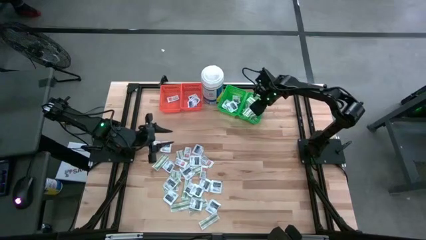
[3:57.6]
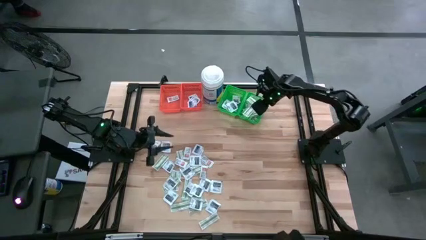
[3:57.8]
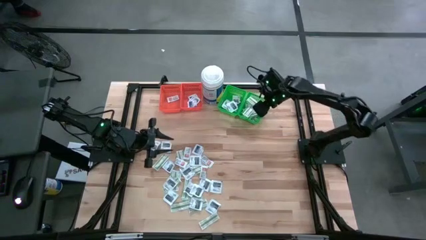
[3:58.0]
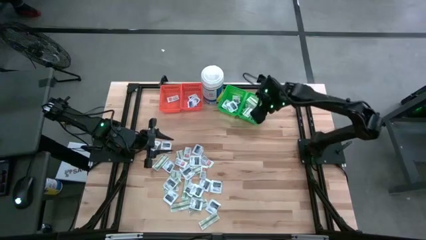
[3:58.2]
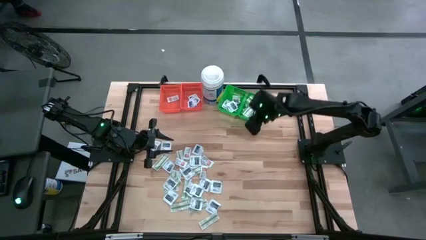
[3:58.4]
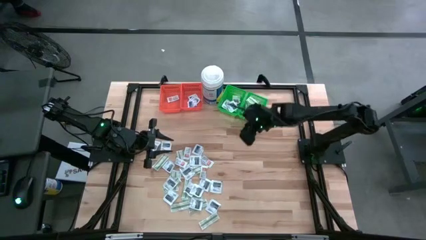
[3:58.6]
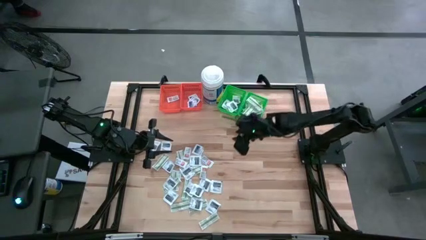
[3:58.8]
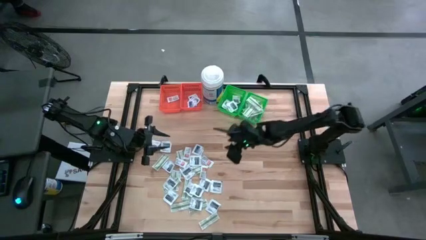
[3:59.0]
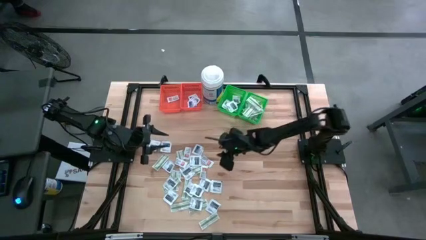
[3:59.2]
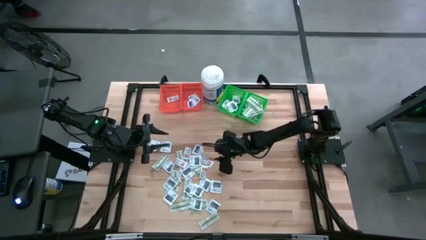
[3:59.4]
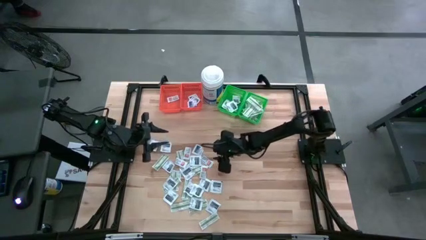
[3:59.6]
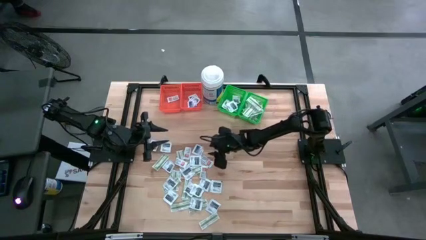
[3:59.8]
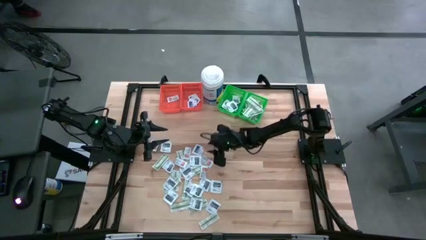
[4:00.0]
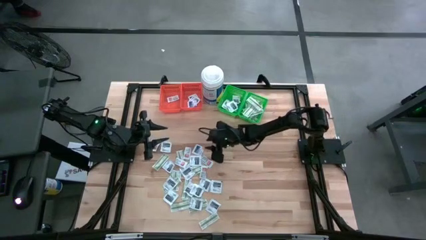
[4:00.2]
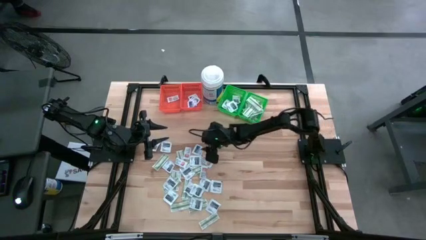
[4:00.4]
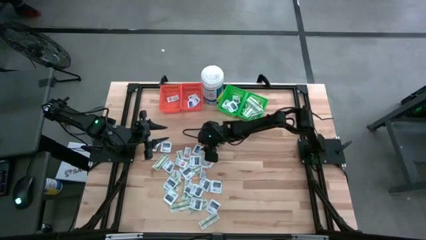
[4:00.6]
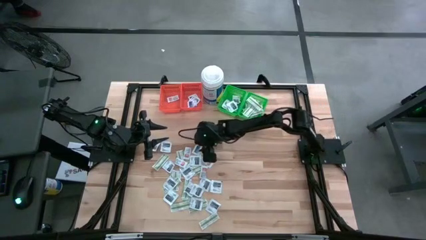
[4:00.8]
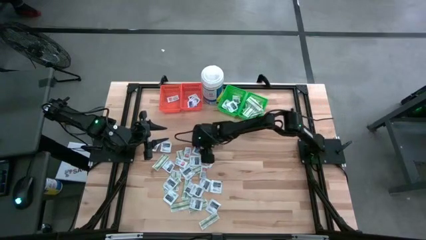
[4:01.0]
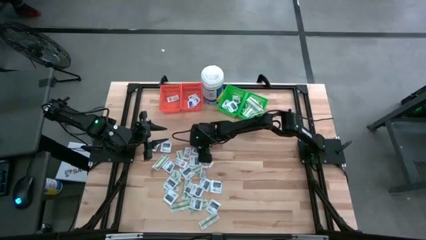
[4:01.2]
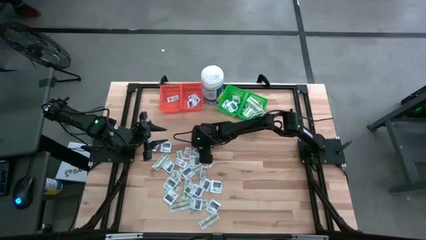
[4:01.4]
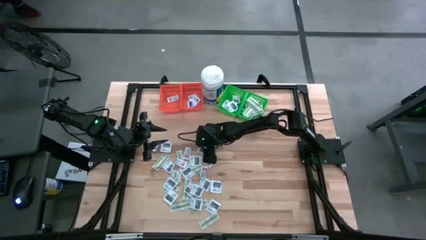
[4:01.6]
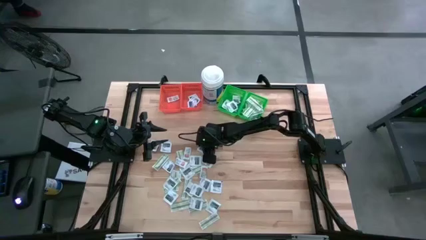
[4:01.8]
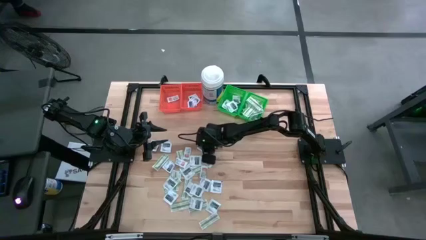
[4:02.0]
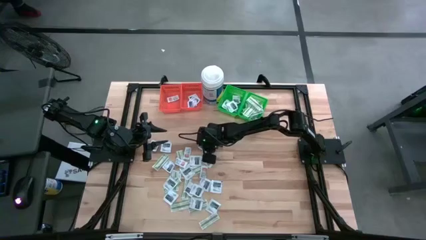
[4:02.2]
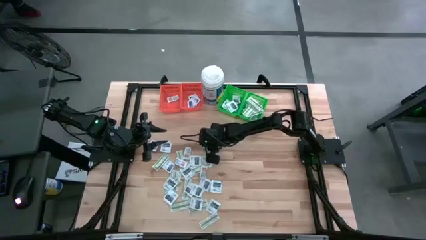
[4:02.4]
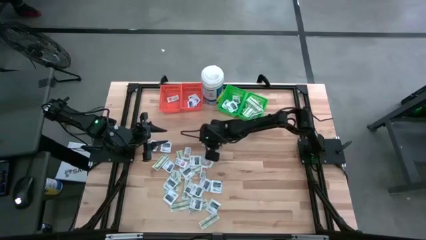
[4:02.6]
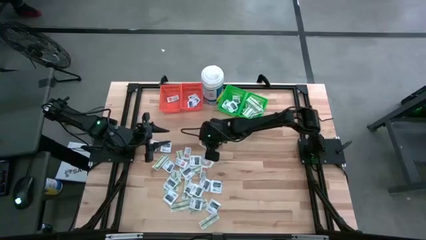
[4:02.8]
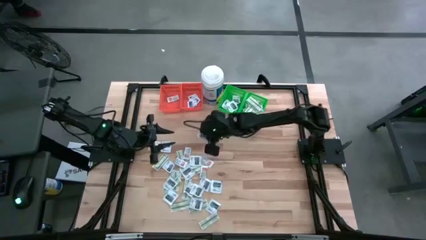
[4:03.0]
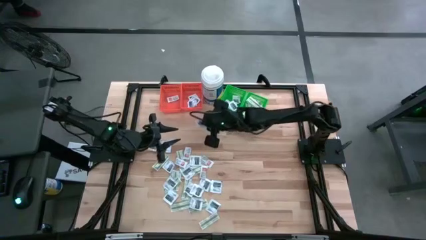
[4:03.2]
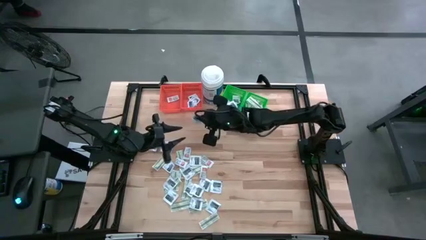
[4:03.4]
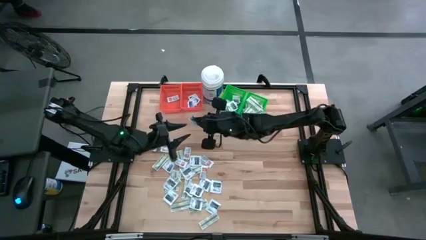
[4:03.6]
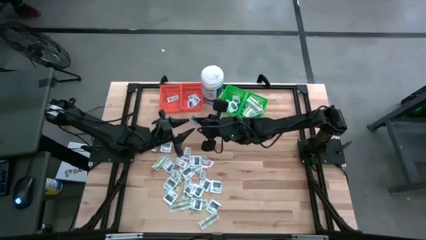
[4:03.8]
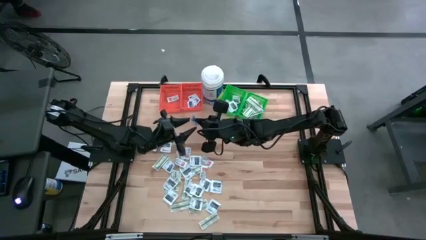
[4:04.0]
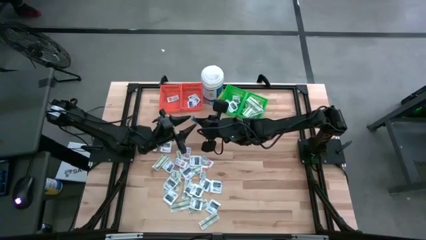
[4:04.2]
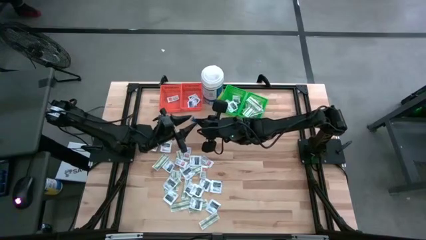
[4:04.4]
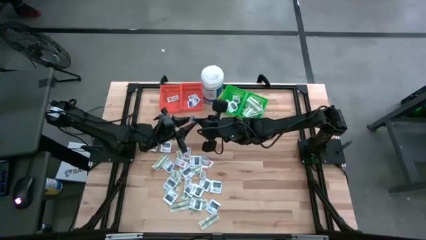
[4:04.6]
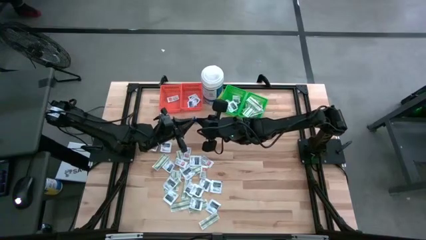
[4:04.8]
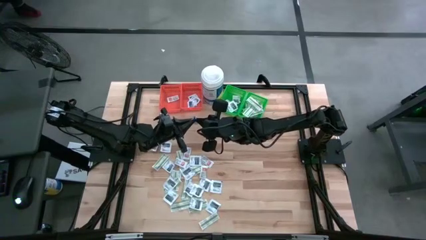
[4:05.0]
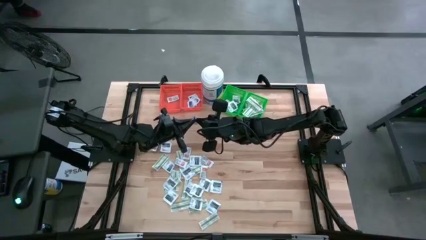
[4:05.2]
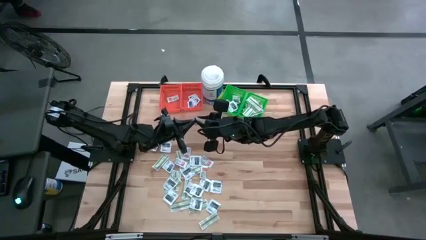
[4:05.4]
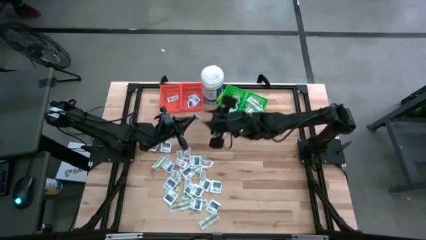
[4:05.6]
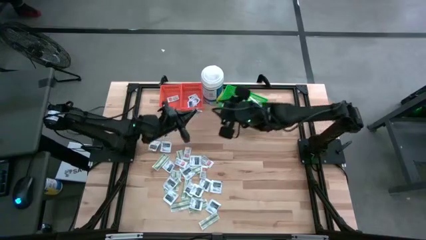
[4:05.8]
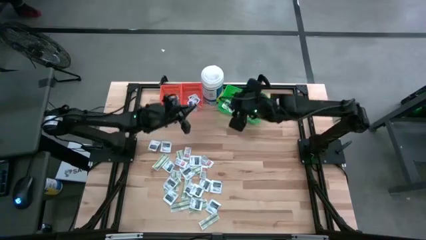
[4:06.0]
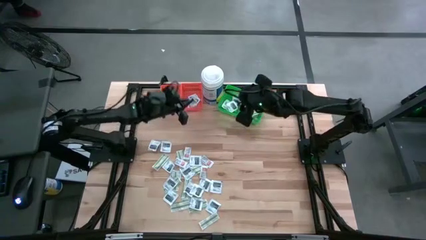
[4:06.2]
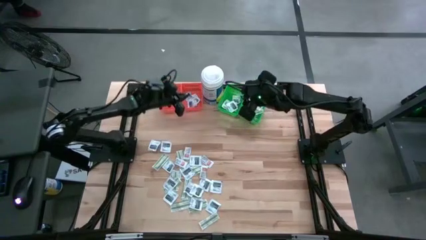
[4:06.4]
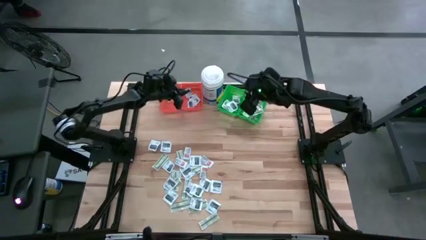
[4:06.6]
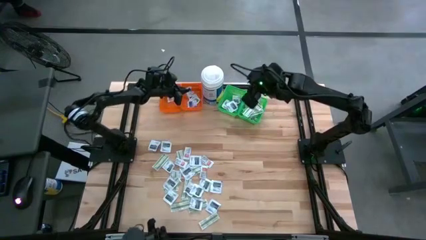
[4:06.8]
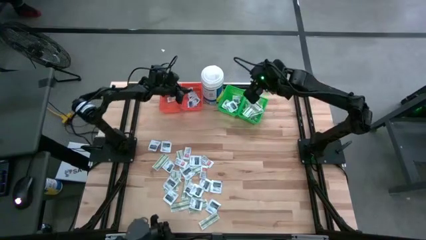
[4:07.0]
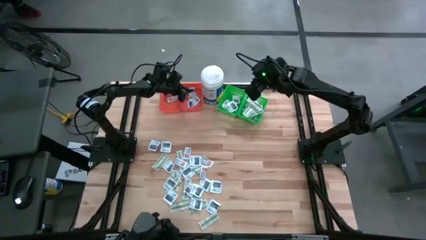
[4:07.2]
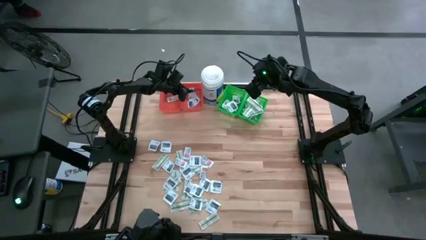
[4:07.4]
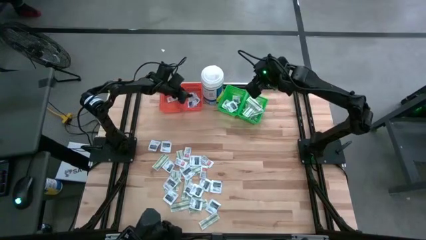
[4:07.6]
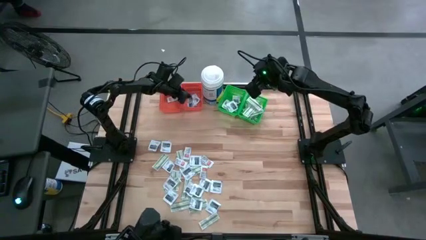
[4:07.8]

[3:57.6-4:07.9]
Task: Pick & Place First Aid Supplies
Put the blue alcohol pad into the right orange bin

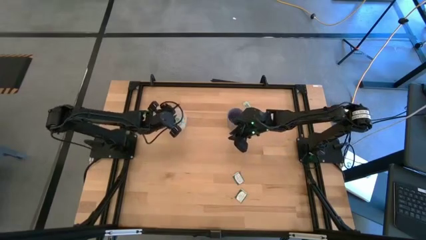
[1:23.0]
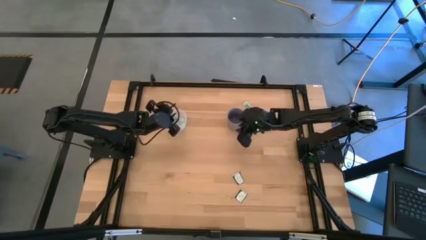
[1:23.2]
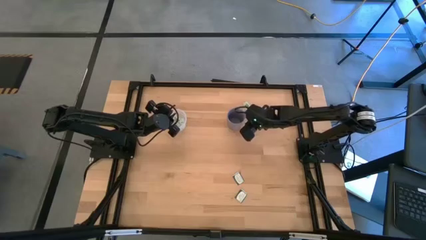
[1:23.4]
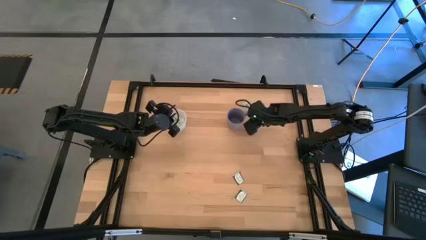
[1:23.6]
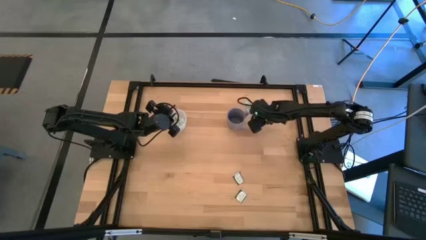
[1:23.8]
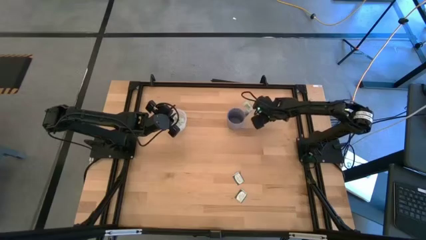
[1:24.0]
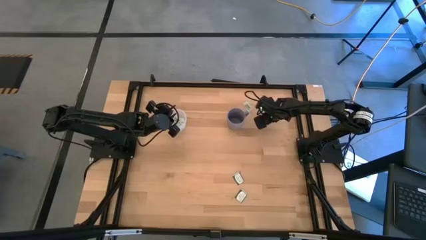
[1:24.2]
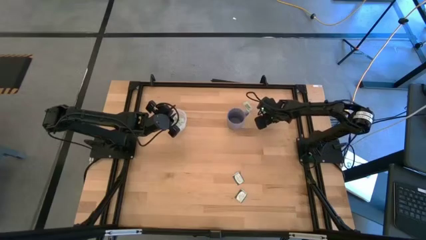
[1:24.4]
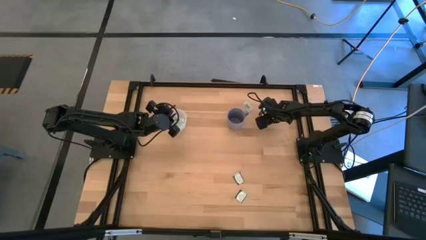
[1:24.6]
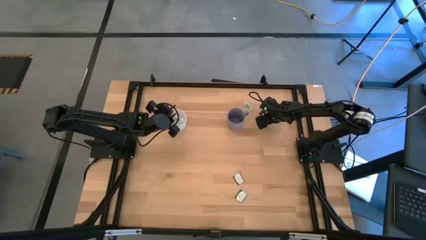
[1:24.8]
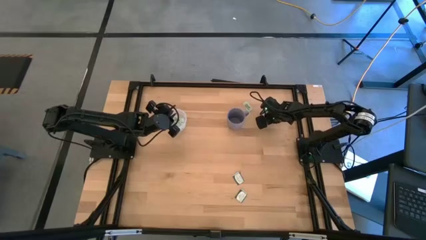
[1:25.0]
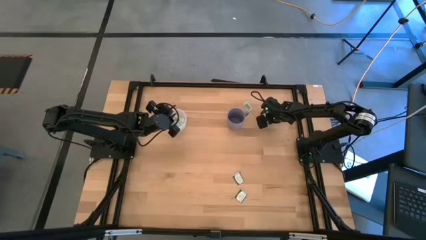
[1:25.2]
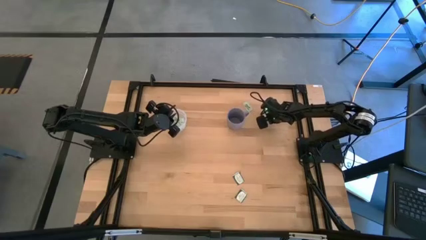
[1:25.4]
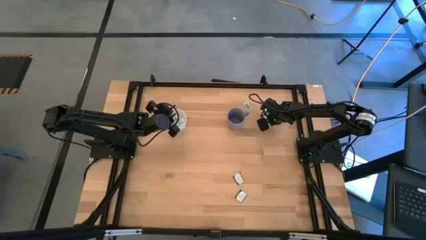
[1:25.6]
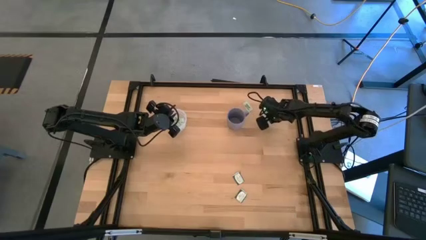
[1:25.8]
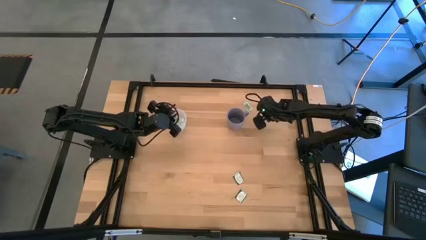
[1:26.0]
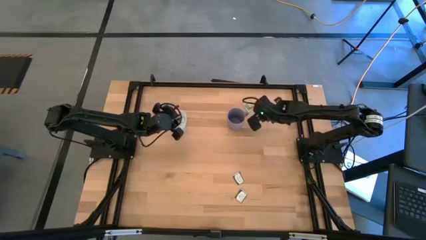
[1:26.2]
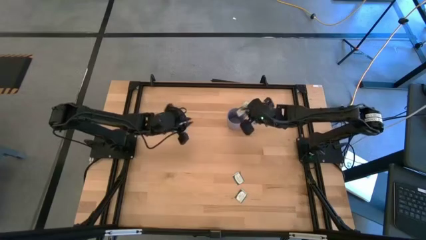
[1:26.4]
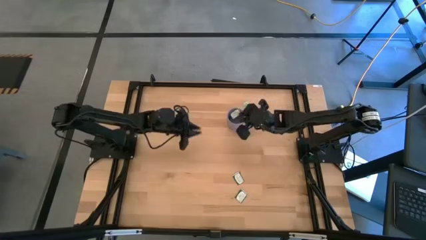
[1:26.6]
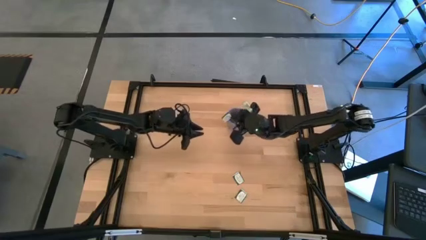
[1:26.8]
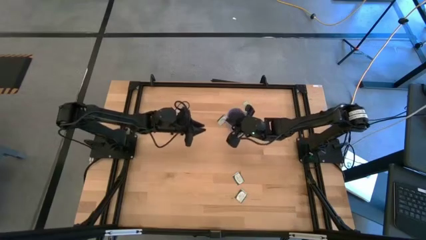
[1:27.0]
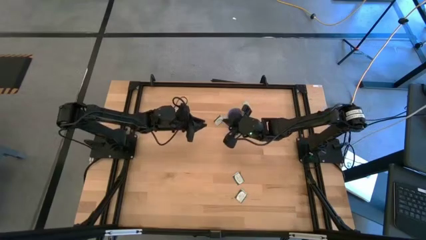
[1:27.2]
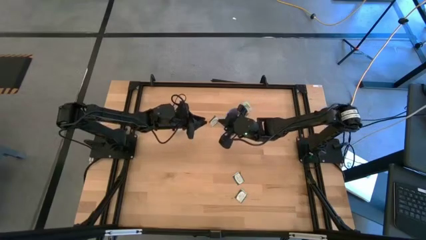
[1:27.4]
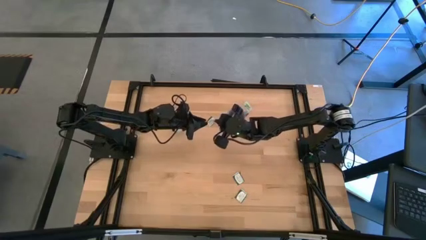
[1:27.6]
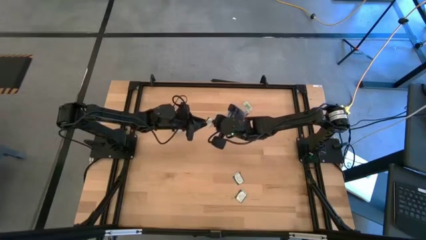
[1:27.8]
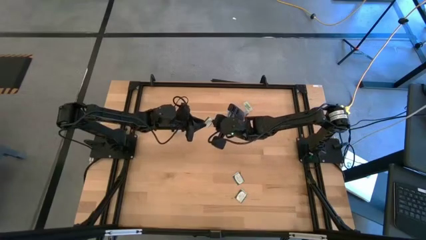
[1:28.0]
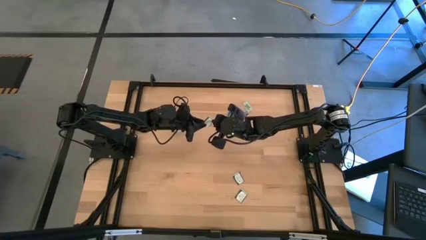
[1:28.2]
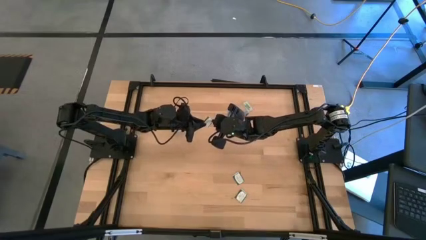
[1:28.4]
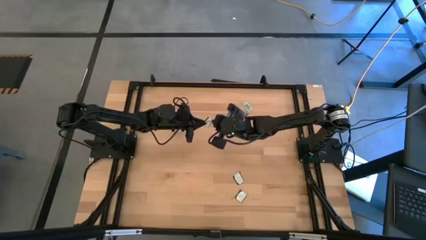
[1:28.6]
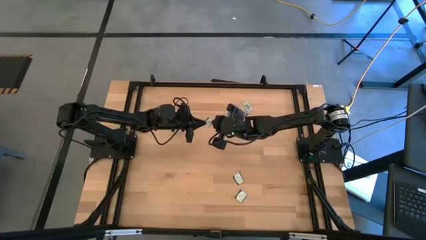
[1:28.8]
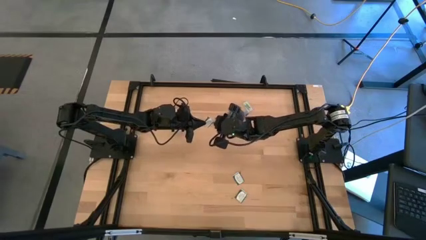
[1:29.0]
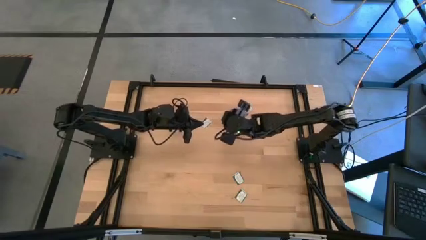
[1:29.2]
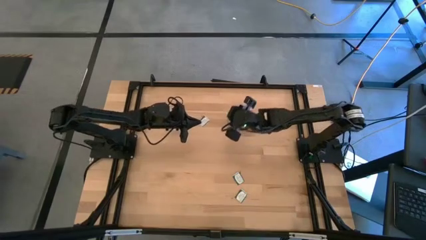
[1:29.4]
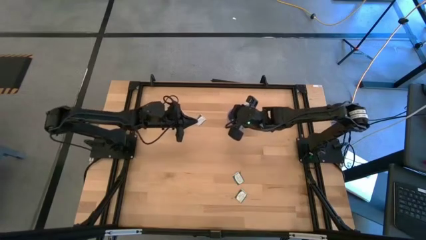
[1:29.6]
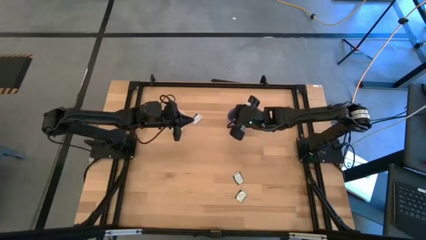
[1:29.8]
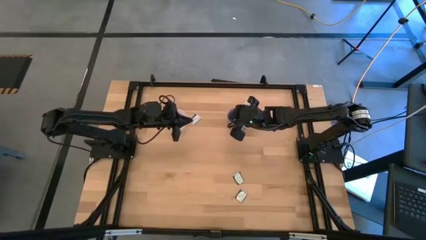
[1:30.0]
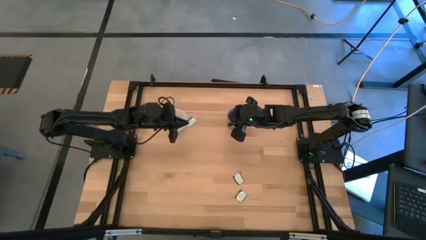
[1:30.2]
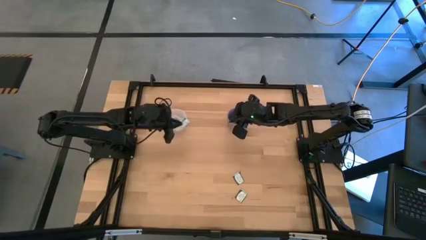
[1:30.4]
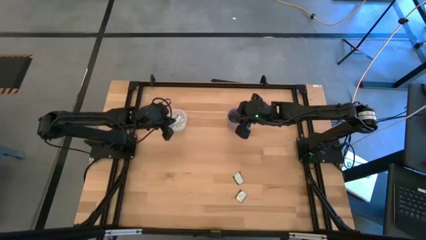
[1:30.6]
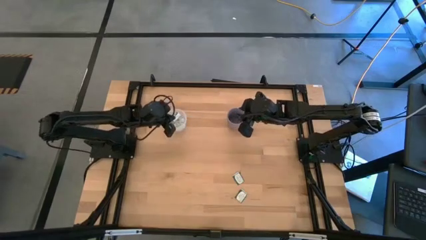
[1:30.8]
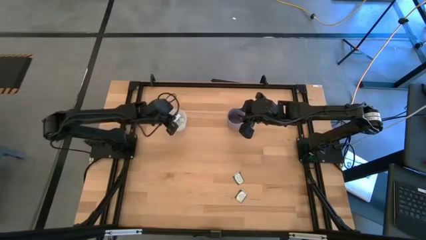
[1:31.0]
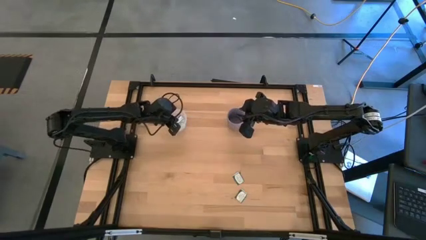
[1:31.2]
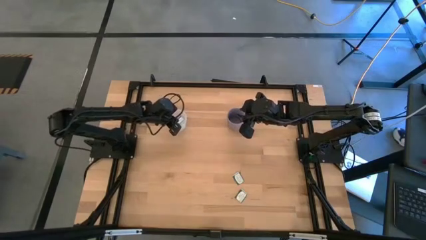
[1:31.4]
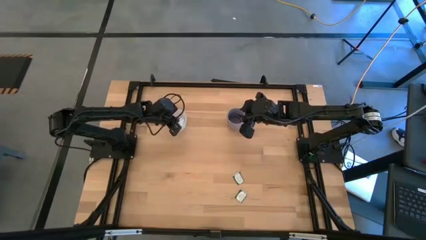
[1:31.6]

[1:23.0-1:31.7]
Task: Pick and place Stevia / Truvia into bins
Put the green stevia packet into the transparent container
